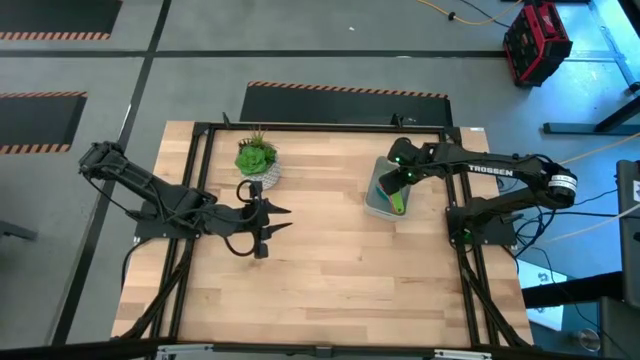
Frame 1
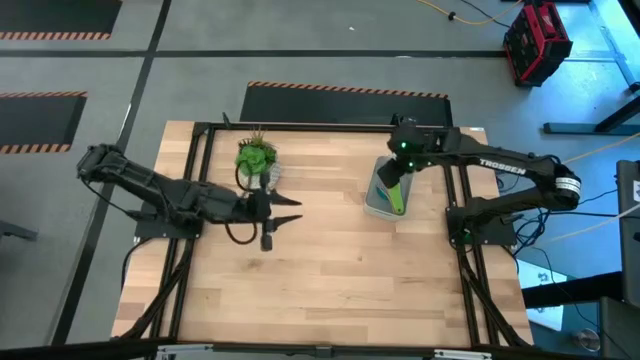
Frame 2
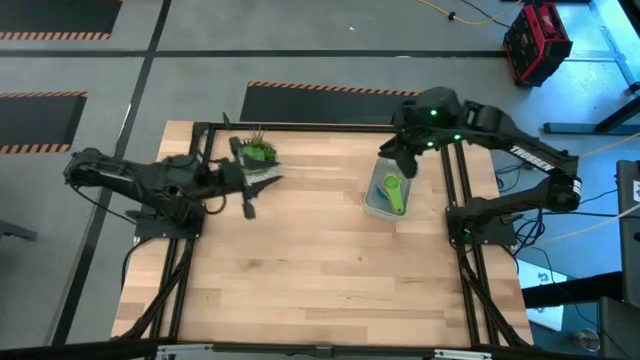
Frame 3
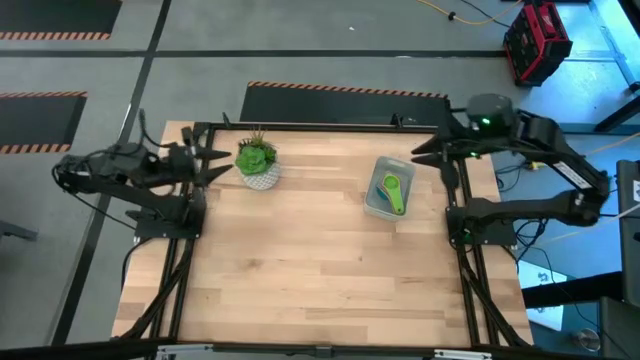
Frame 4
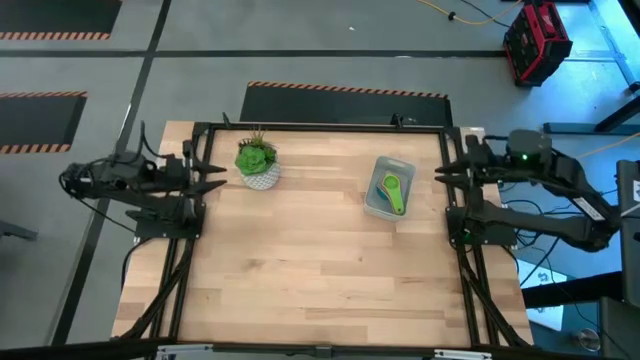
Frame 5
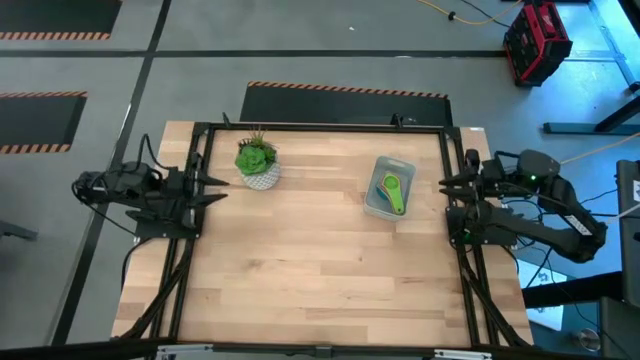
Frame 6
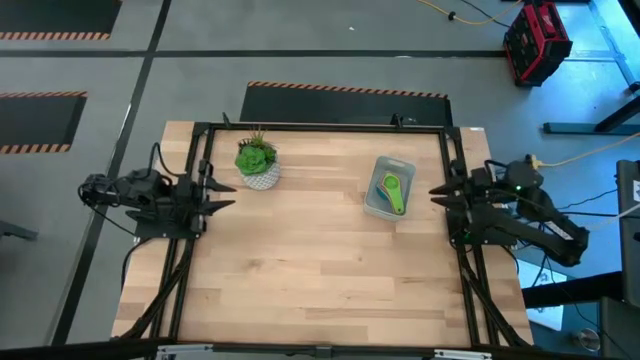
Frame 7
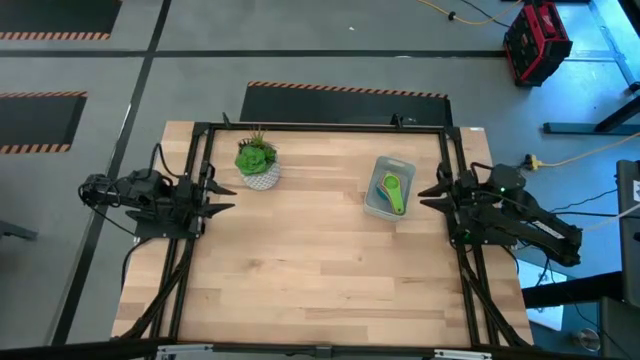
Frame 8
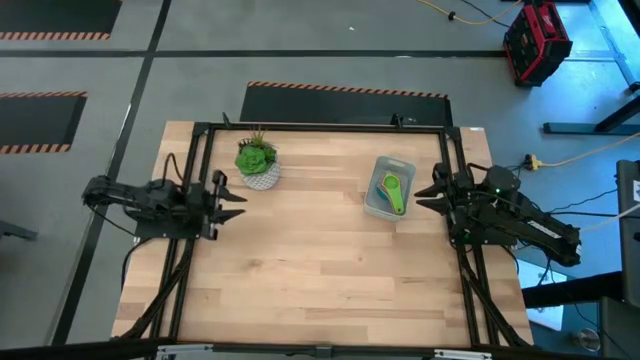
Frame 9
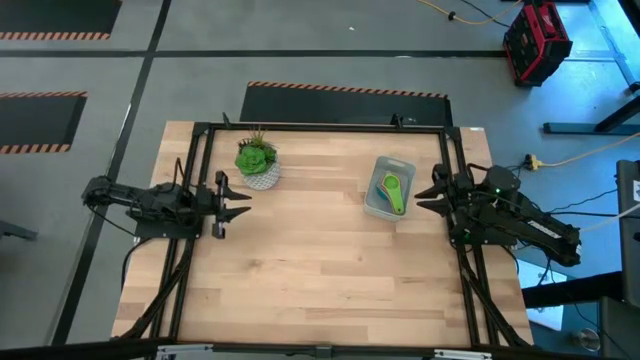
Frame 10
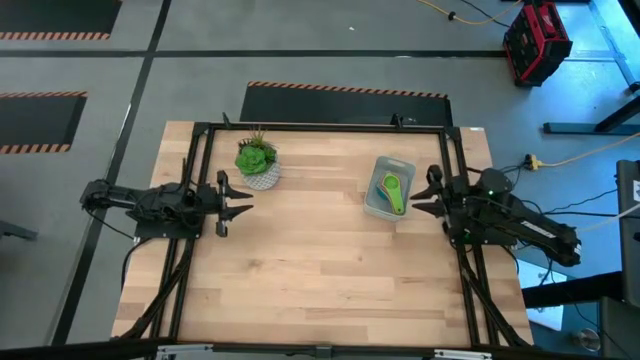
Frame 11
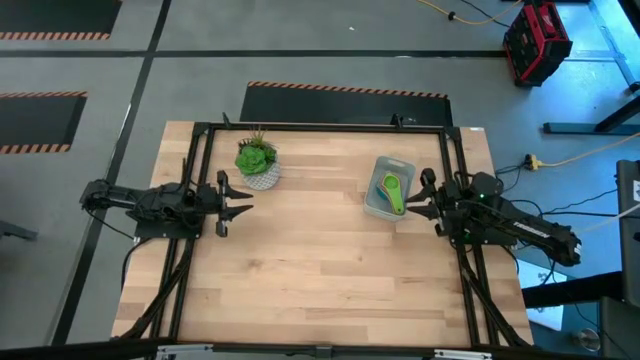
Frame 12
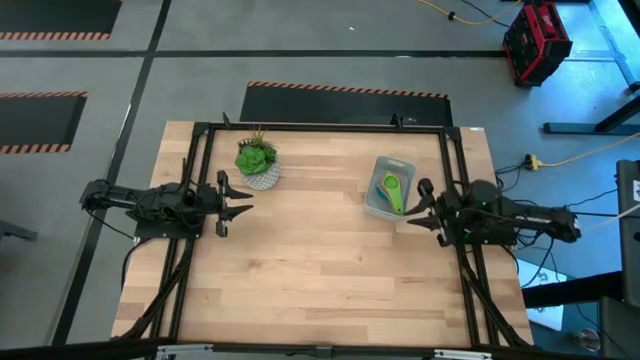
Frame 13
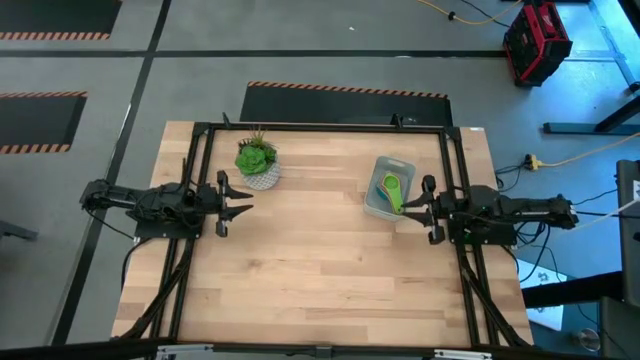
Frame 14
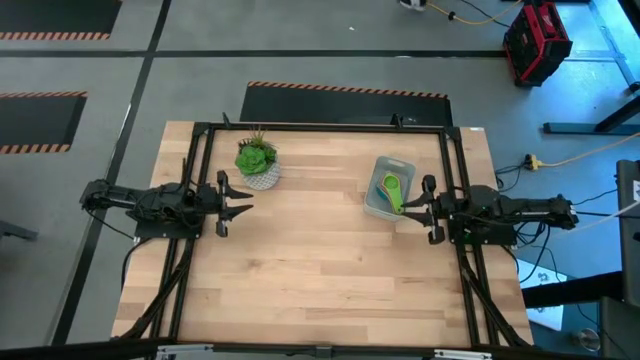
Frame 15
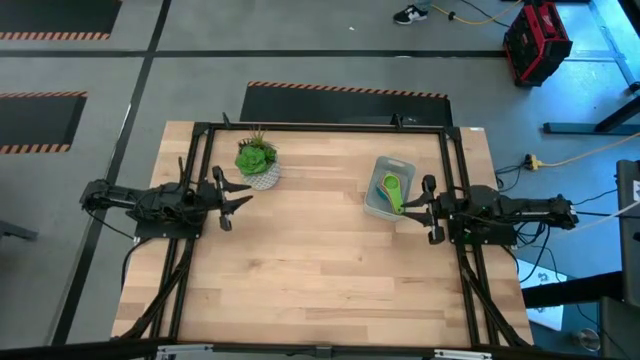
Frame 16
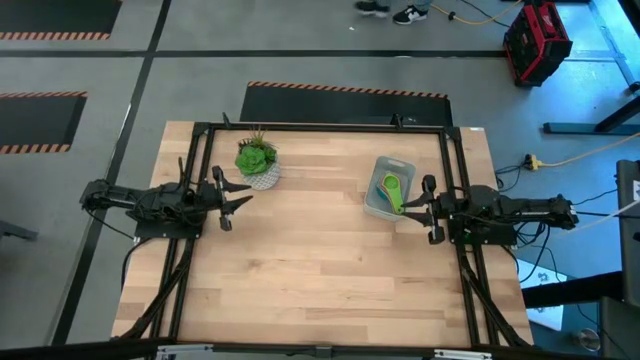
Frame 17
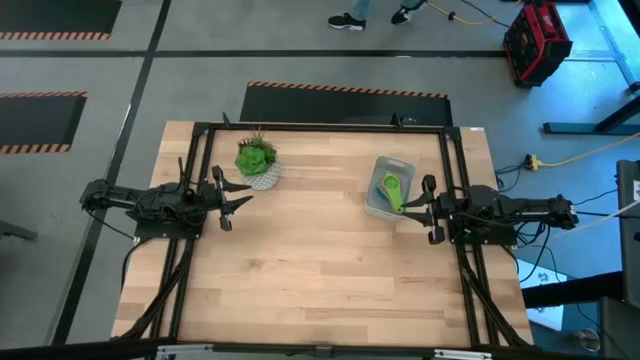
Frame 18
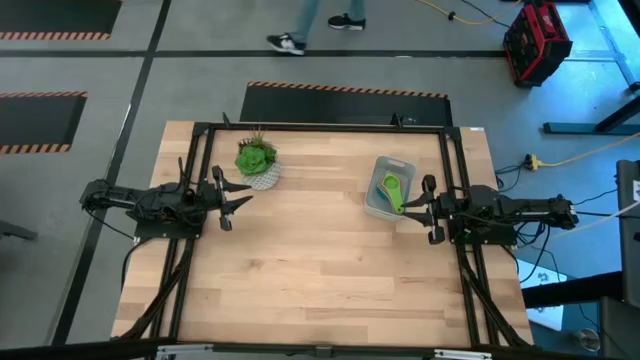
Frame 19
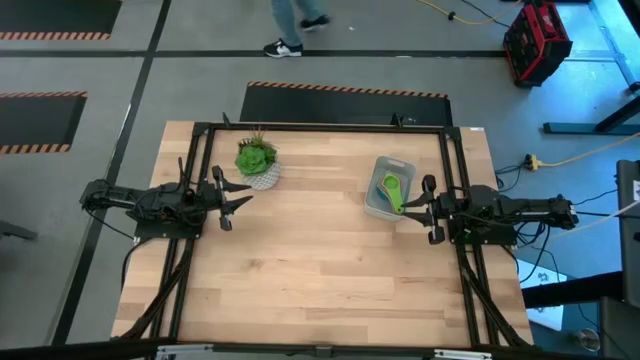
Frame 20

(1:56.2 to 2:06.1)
Task: Nest measuring cups in basket
Return to Home Position

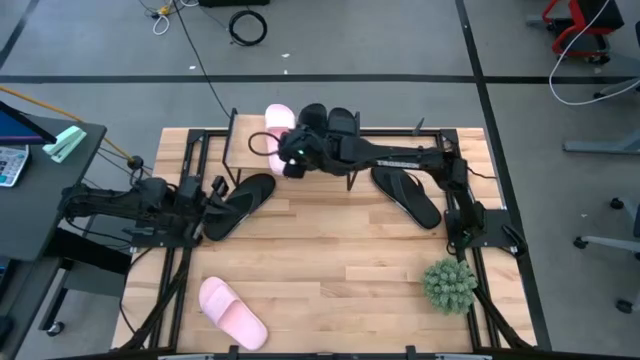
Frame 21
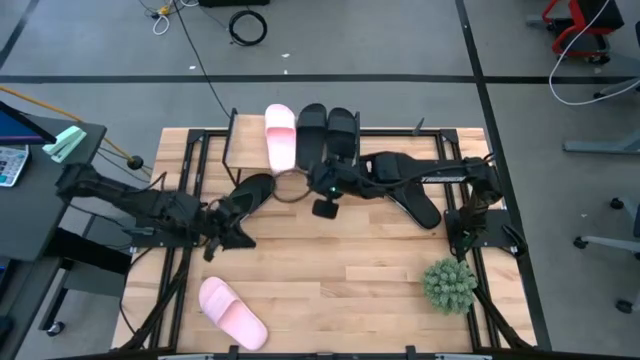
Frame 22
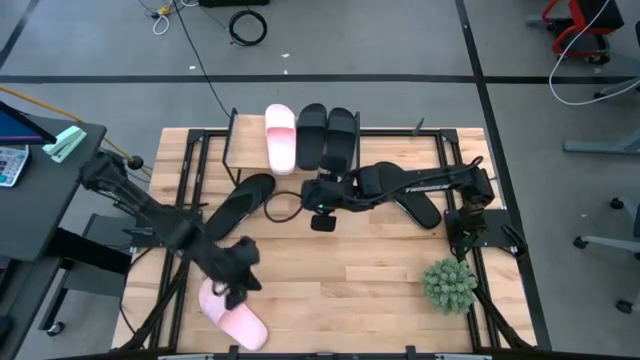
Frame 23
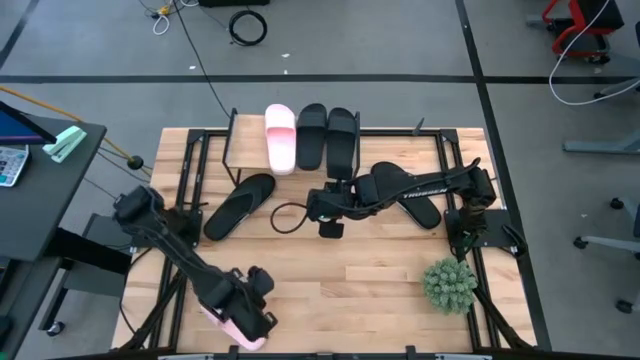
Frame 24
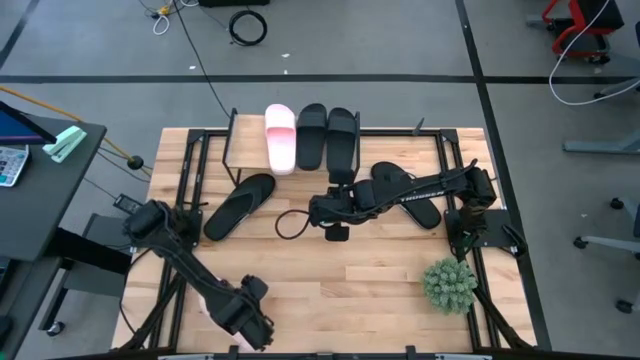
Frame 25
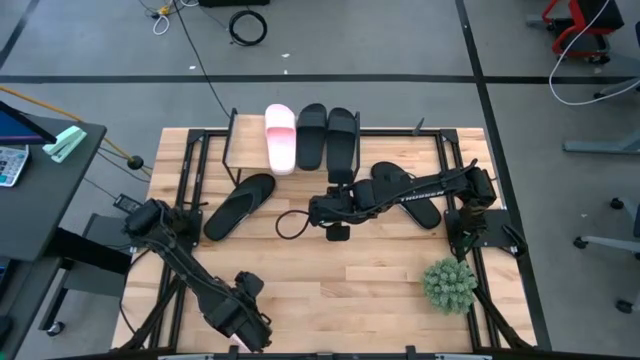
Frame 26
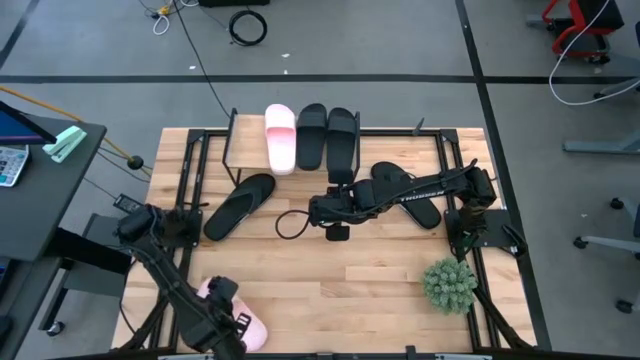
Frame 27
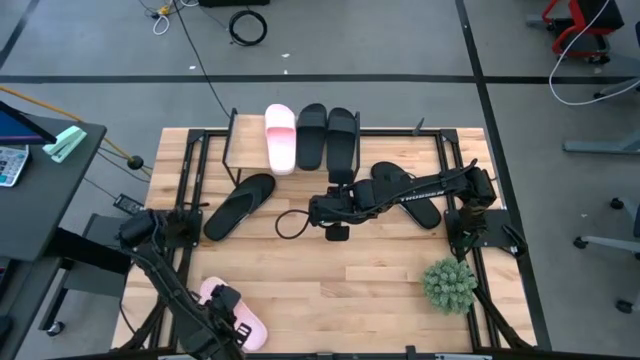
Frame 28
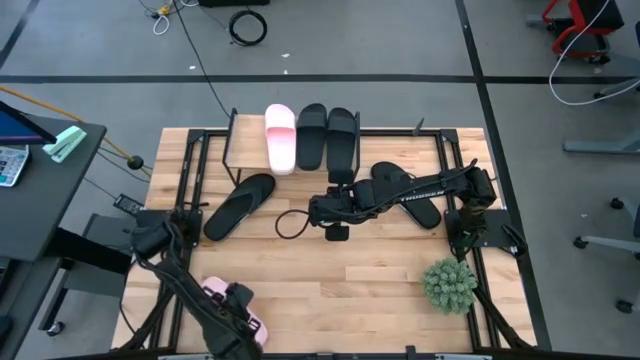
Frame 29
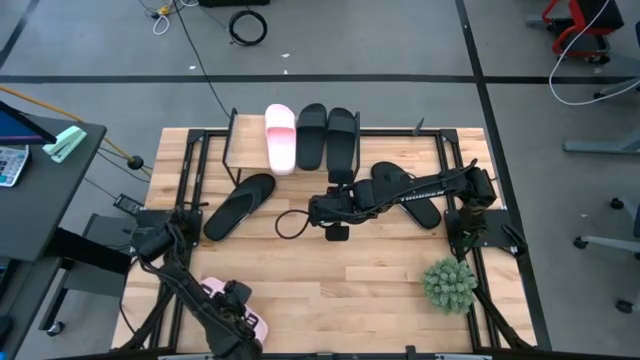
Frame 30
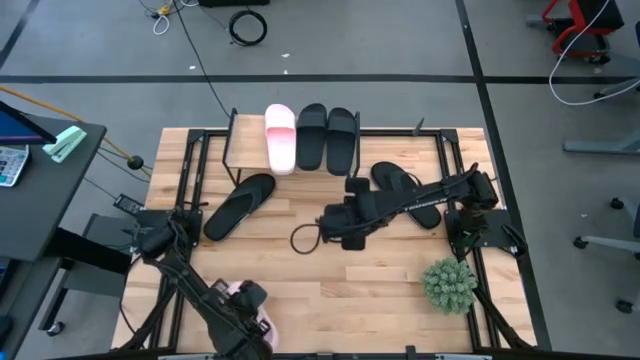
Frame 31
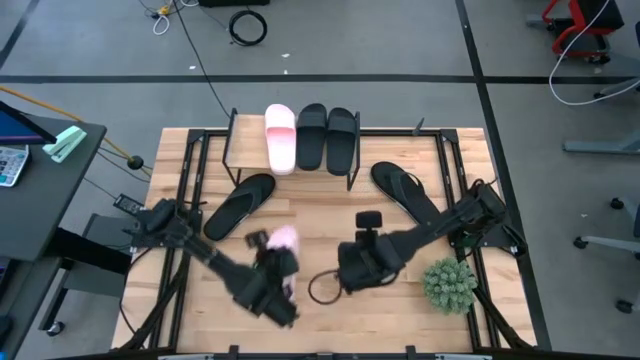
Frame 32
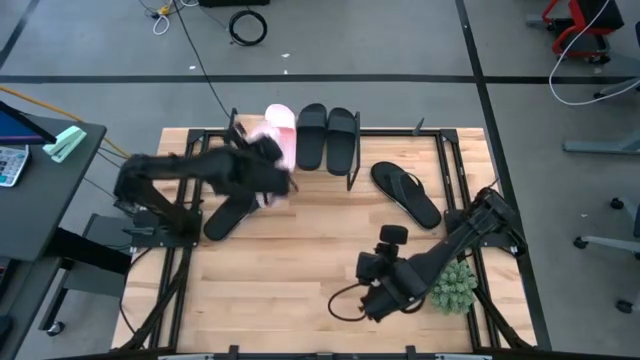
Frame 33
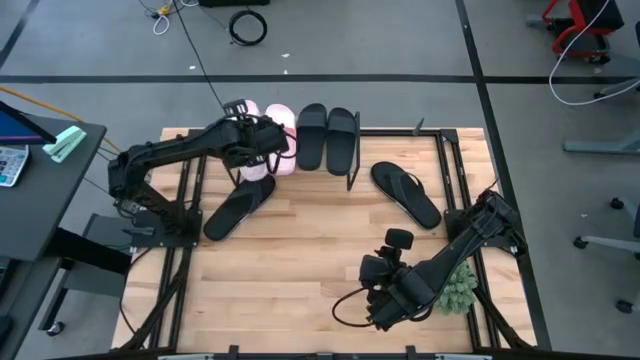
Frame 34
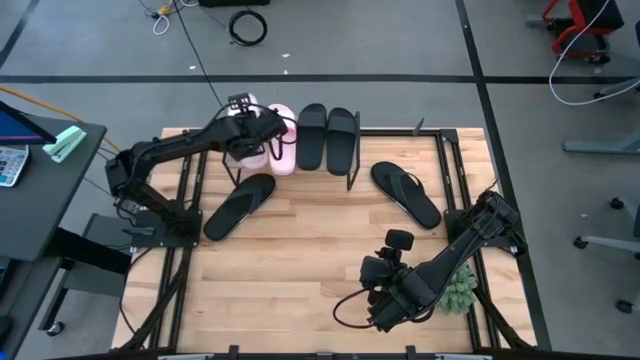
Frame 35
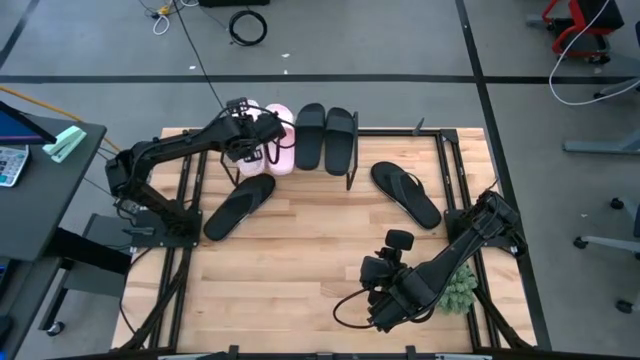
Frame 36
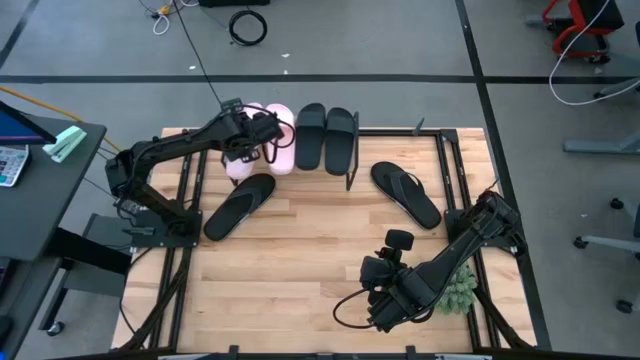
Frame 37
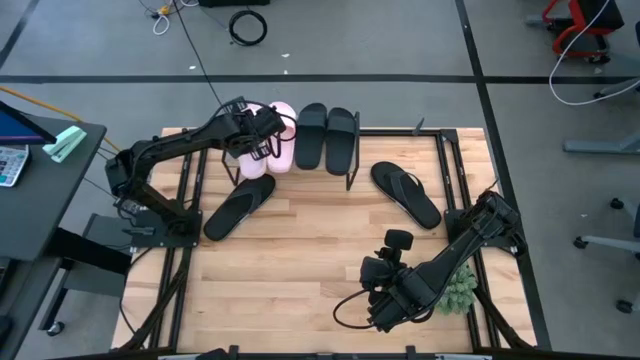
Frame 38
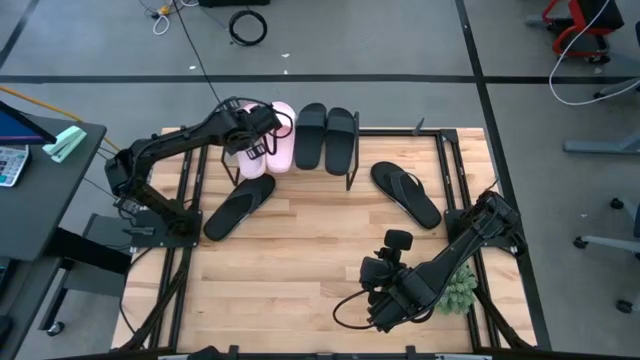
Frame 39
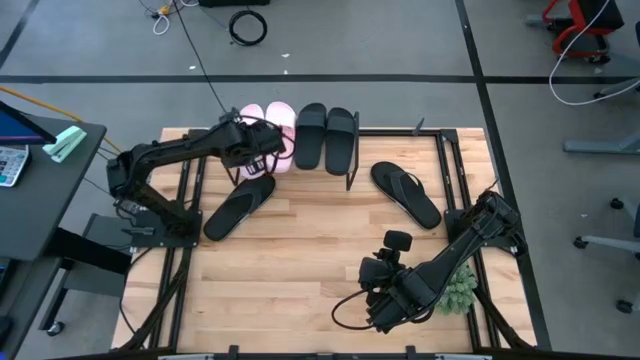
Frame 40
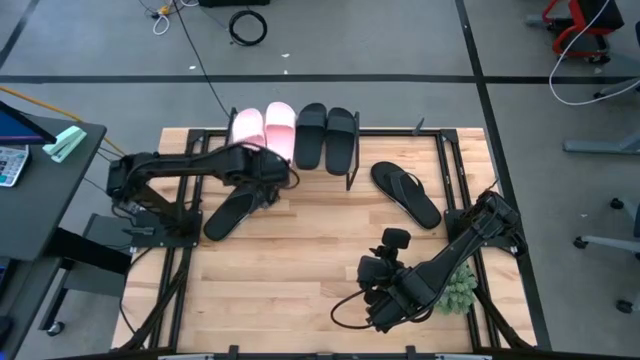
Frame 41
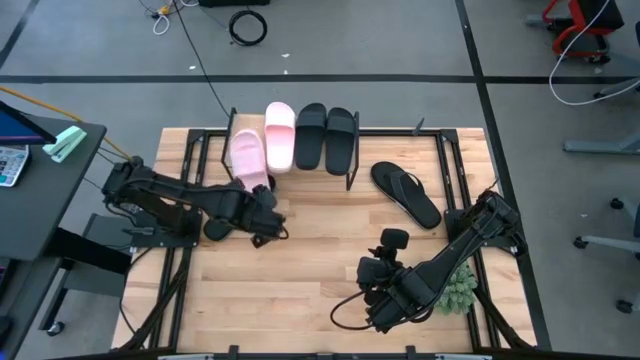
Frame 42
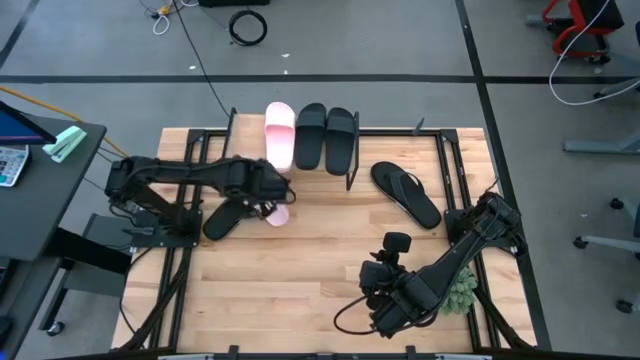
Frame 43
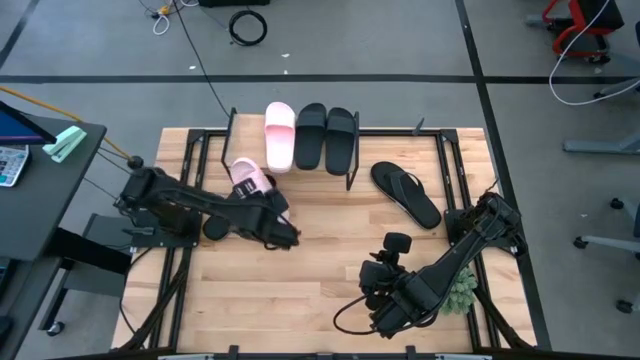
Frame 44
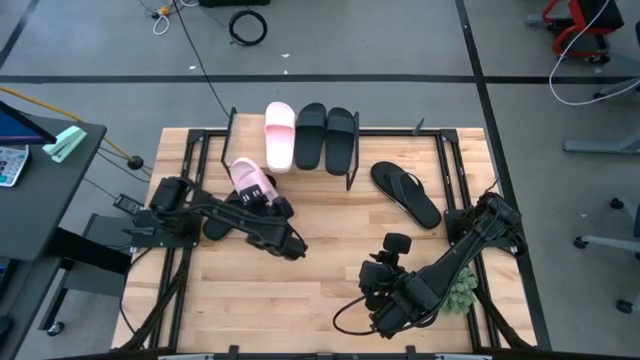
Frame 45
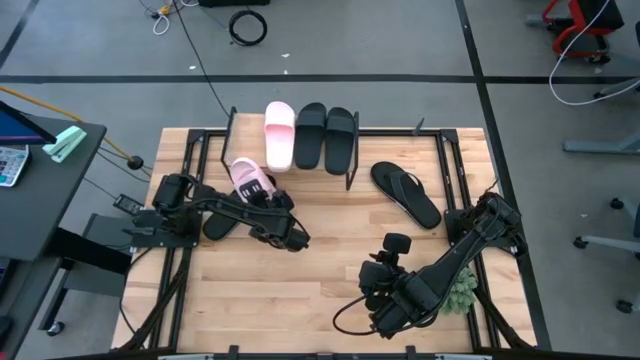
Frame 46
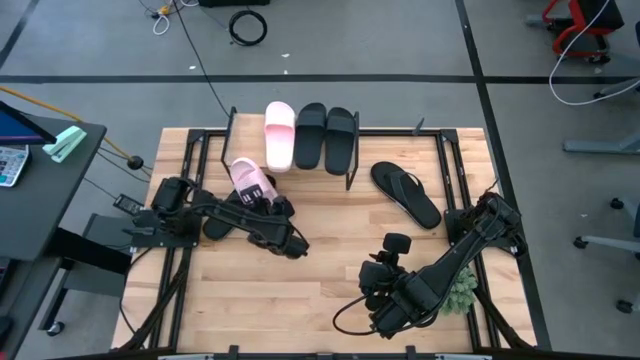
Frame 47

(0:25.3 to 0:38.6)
Task: Pick and place slides into the shelf
Put the pink slipper on the shelf
